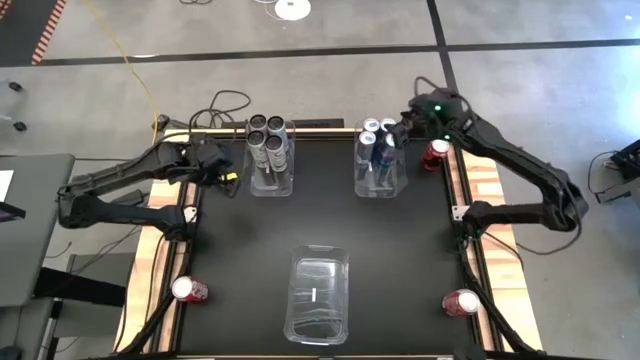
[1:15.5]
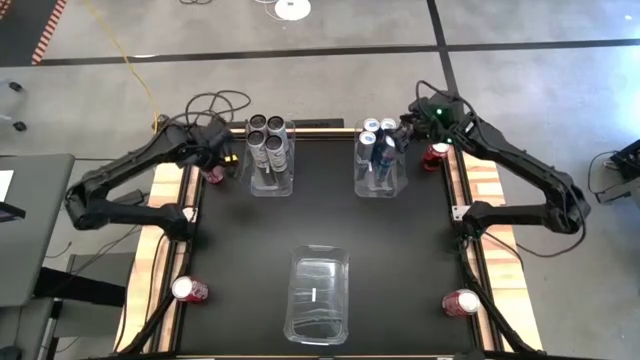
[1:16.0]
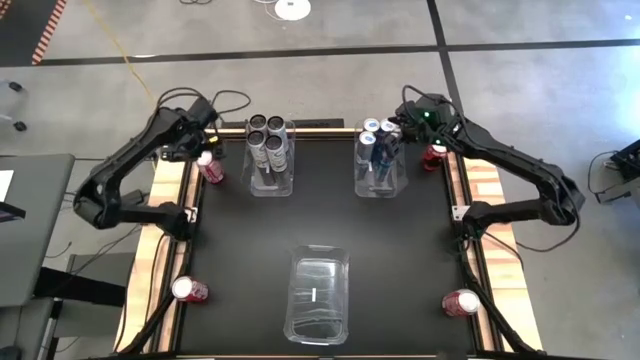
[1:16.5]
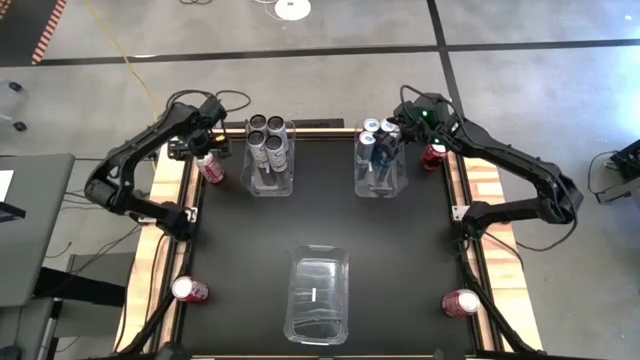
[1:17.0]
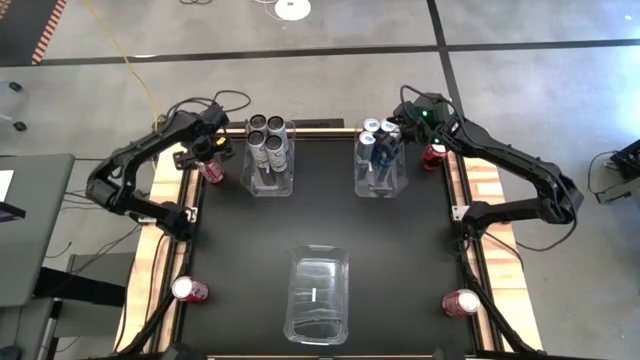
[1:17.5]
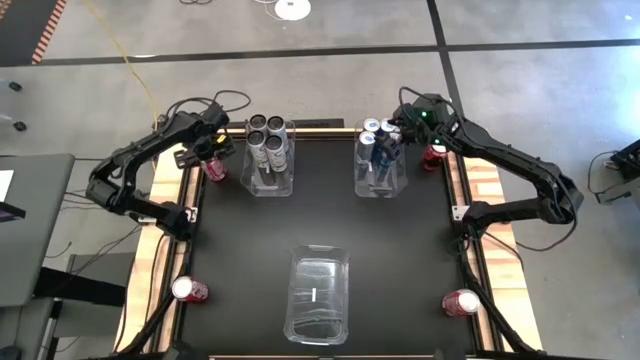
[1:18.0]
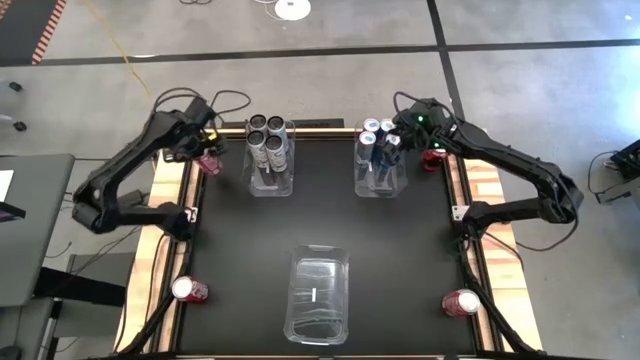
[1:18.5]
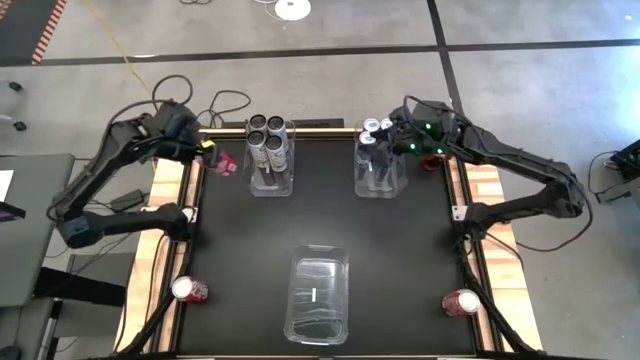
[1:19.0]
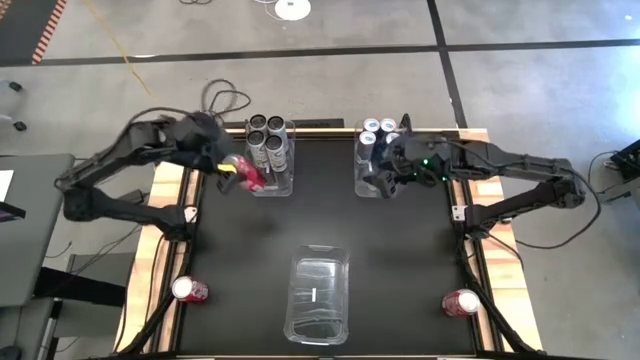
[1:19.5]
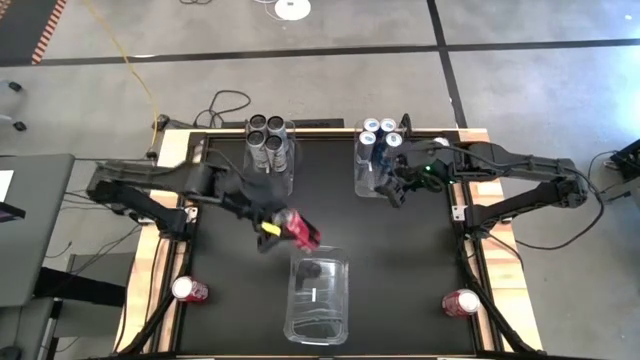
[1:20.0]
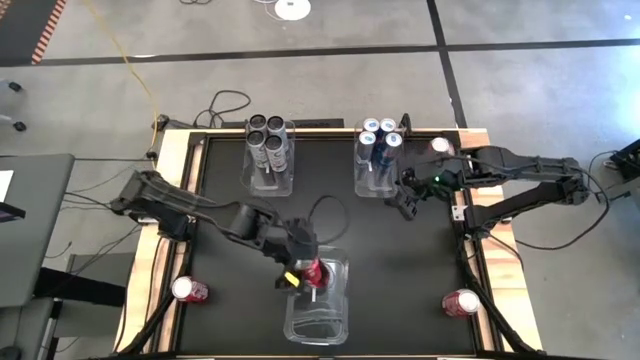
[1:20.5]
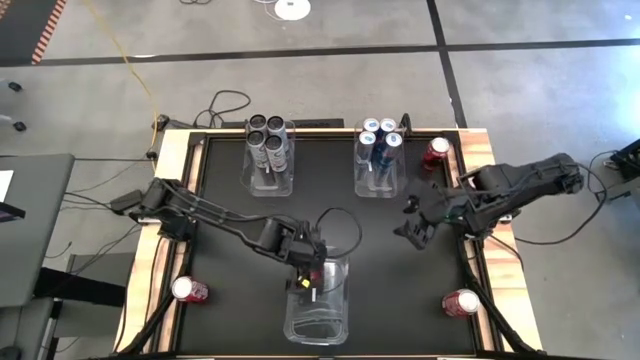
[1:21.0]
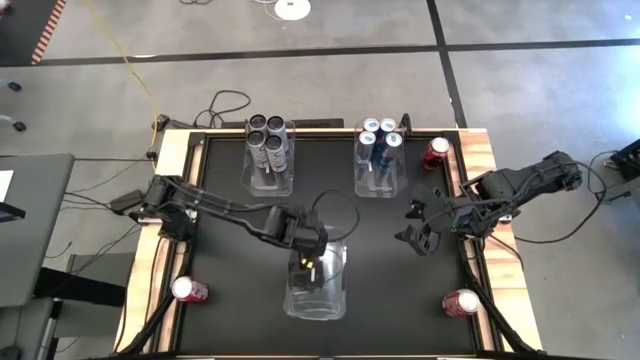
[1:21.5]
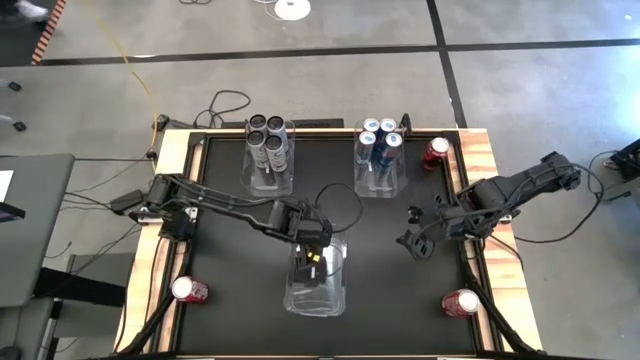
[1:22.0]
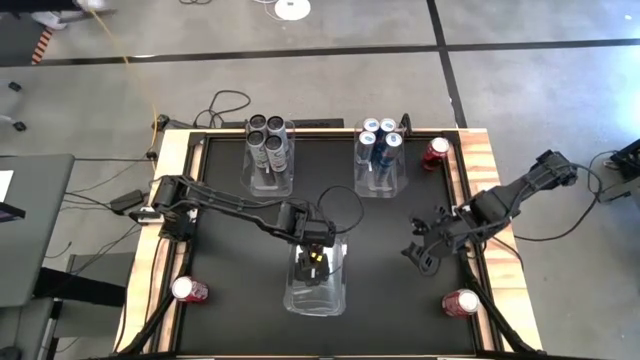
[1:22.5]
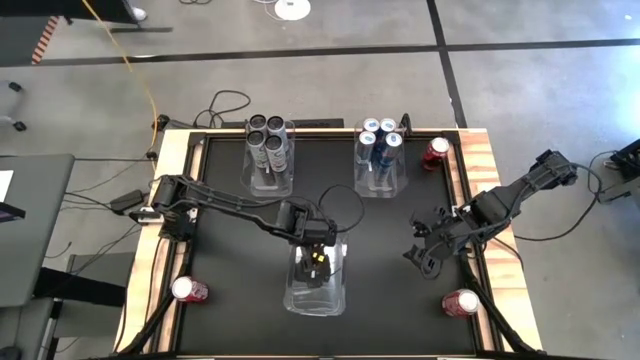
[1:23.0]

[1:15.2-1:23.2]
Task: Sort soda cans
Put the top left red soda can into the bottom transparent bin

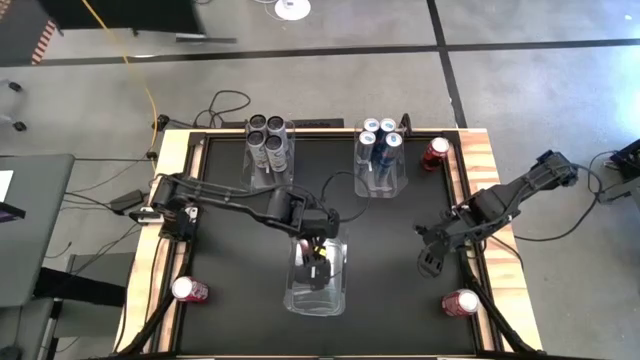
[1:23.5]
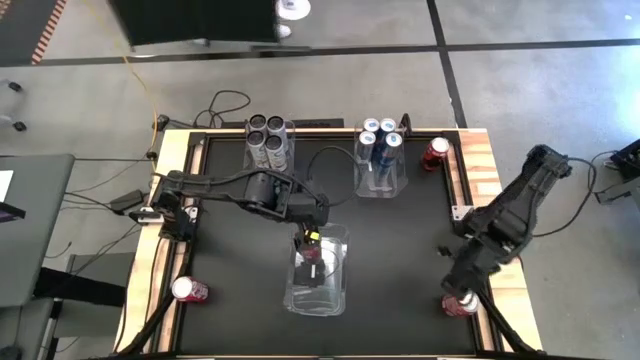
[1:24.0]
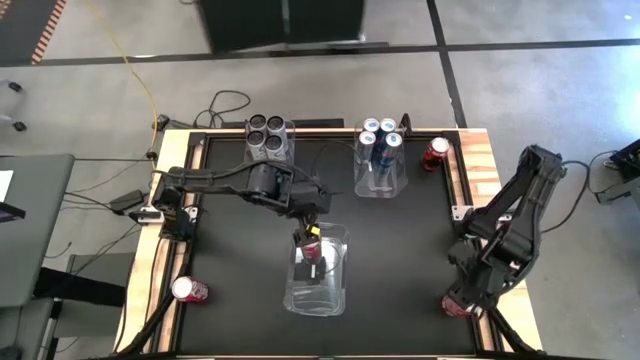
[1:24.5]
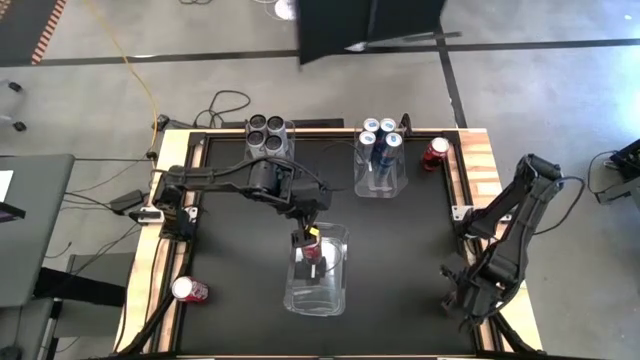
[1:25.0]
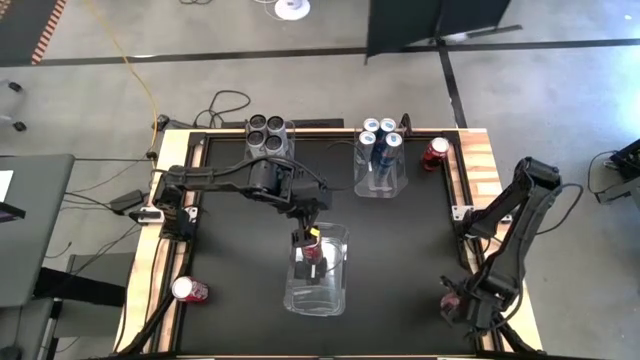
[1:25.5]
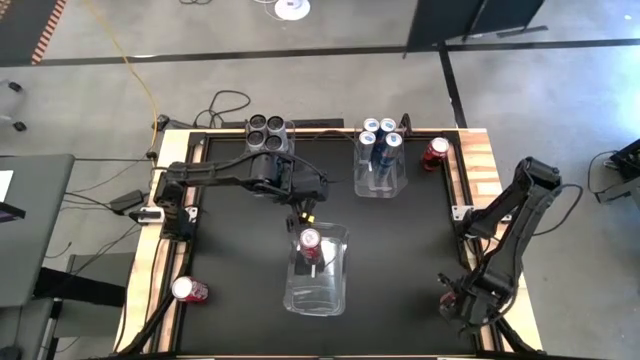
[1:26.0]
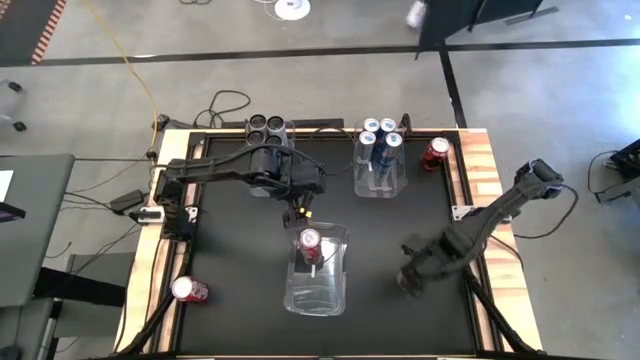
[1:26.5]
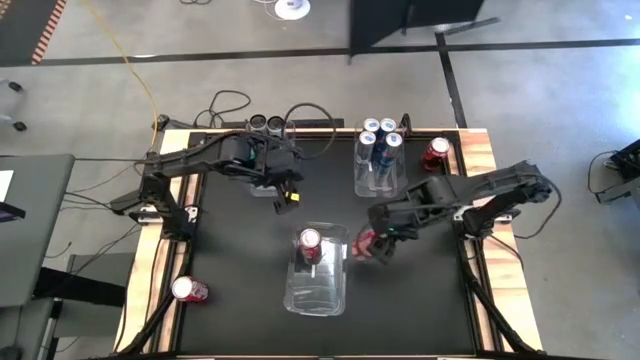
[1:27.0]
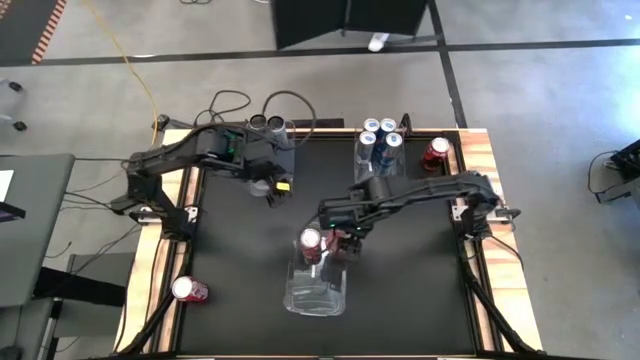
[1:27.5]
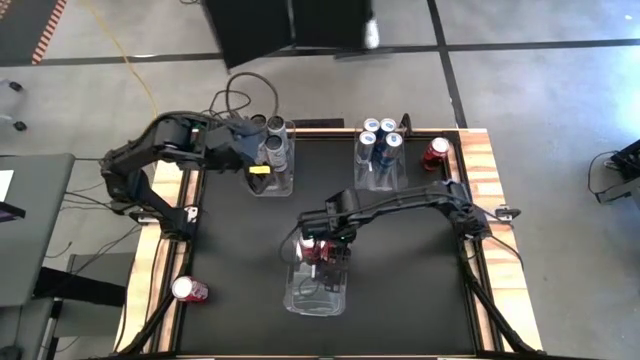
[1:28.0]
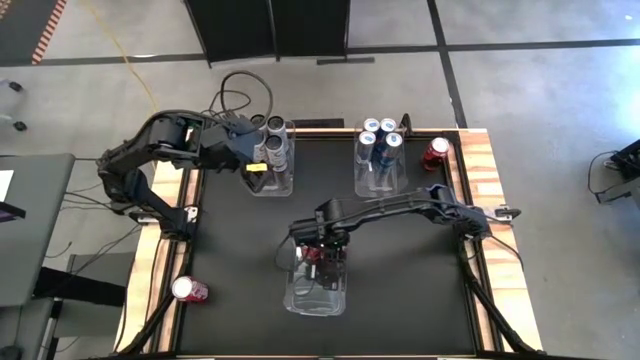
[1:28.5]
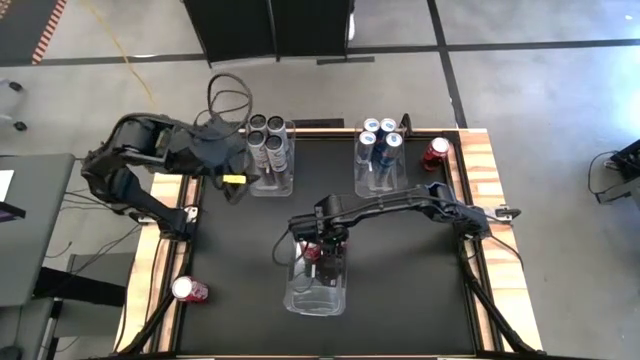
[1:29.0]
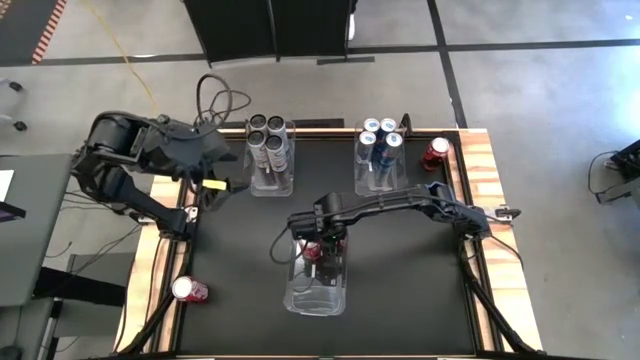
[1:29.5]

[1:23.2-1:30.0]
Put the bottom right red soda can into the bottom transparent bin

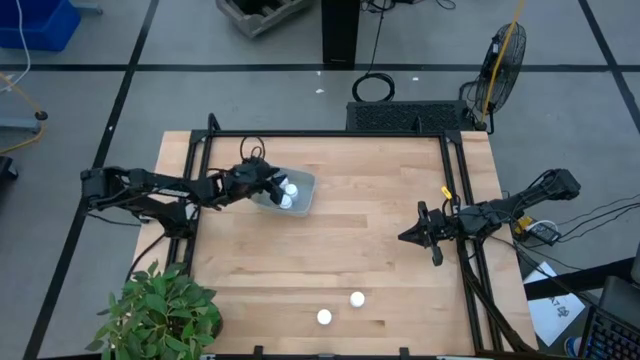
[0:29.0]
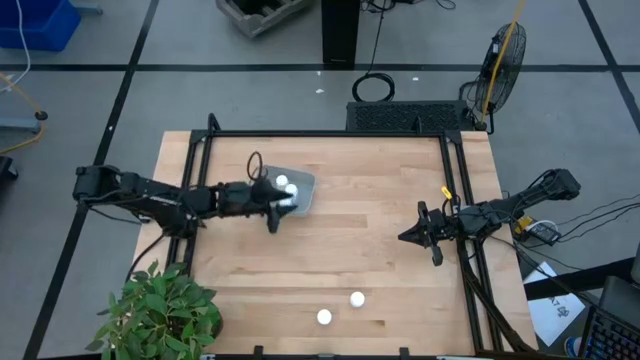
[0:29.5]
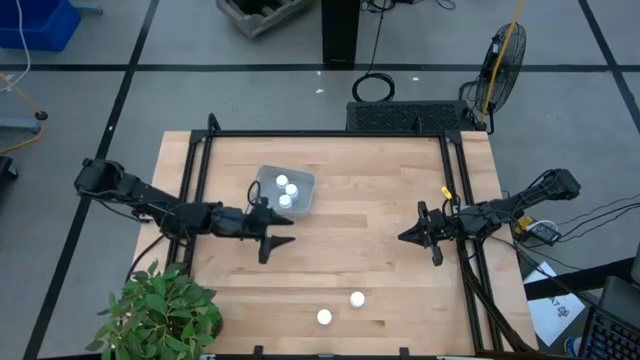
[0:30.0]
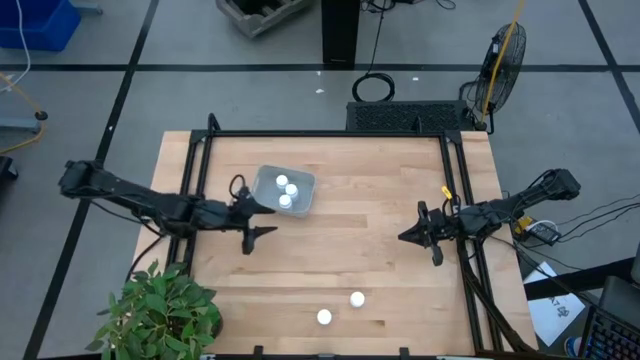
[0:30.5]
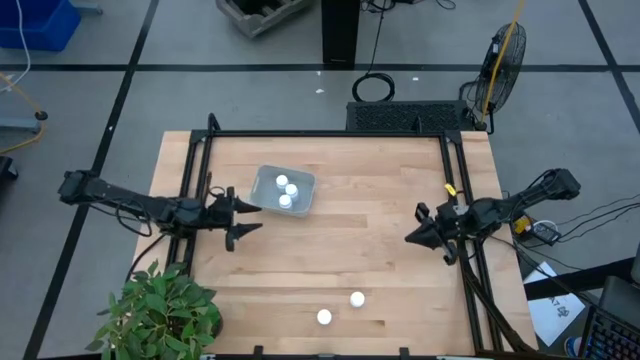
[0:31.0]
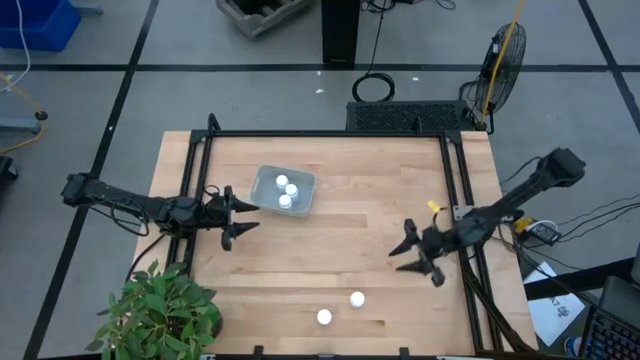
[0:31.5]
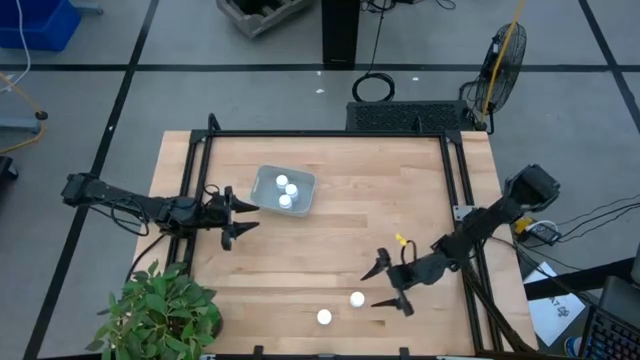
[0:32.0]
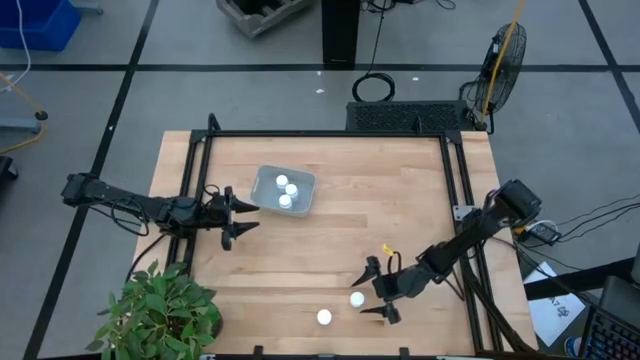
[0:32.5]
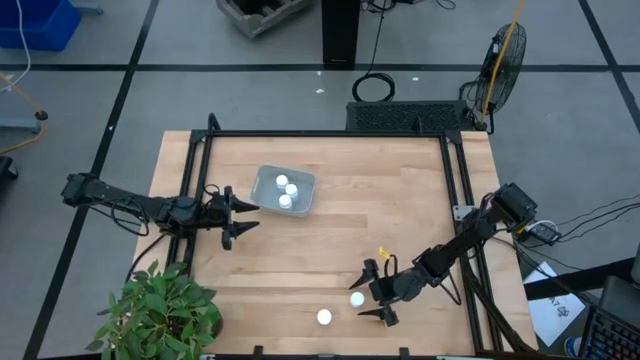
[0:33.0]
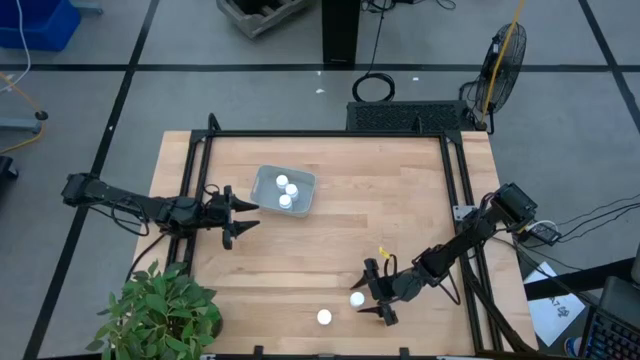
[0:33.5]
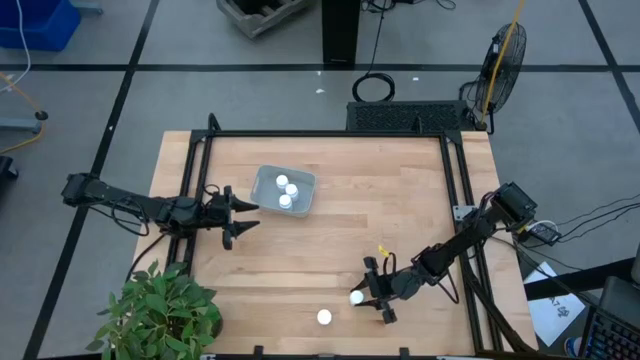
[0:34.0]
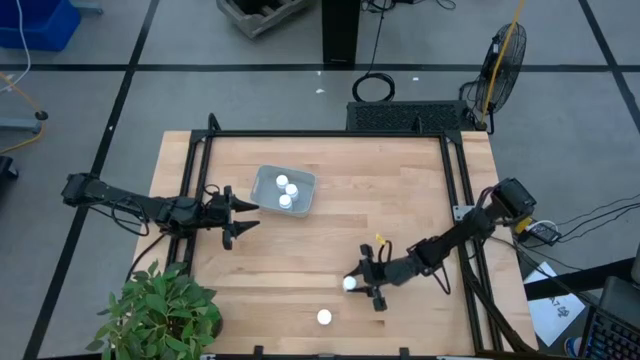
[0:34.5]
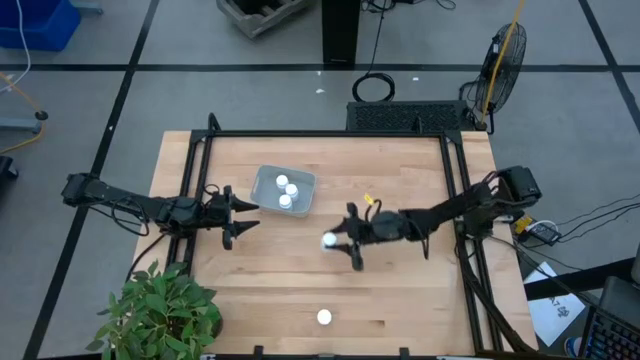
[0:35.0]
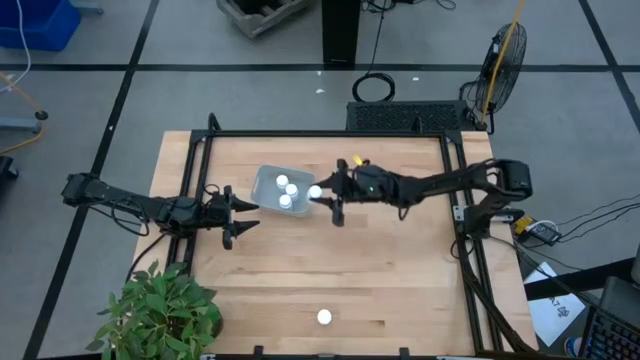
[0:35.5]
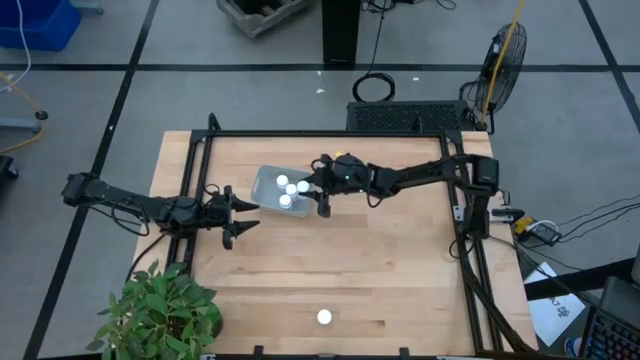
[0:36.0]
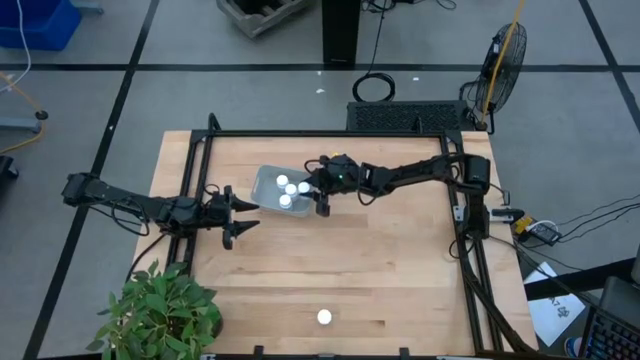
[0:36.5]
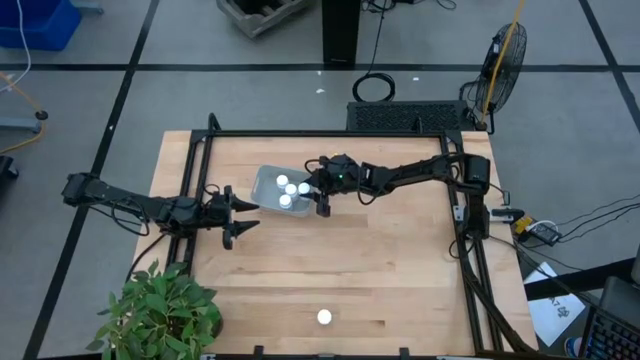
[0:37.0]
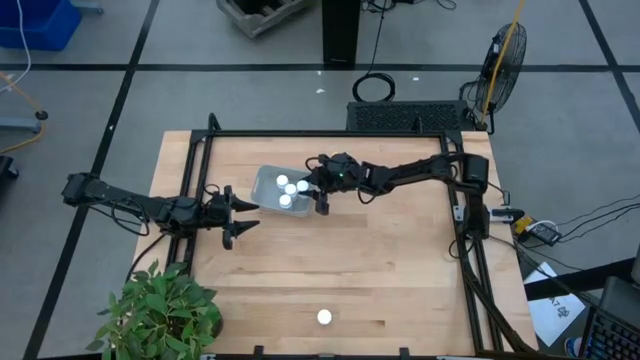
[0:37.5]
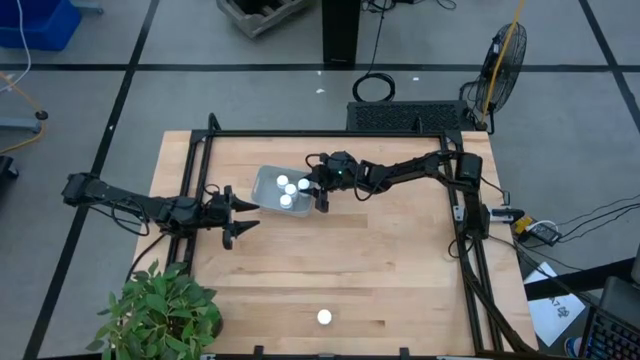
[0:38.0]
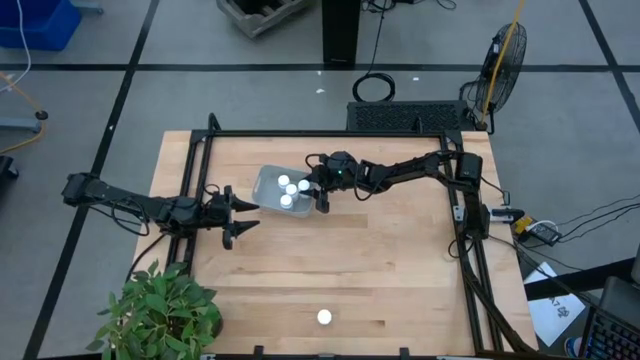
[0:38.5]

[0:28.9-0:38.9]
Task: Pick and place pill bottles into a basket
Put the white medicine bottle into the gray basket
